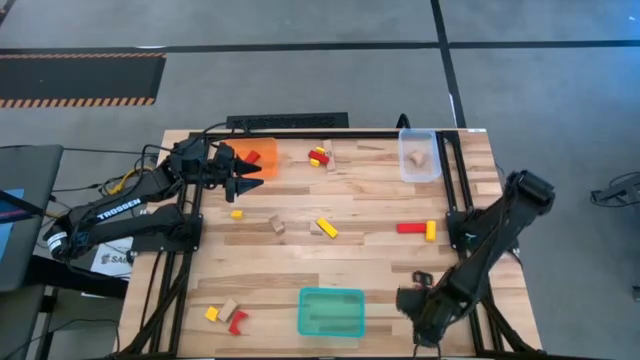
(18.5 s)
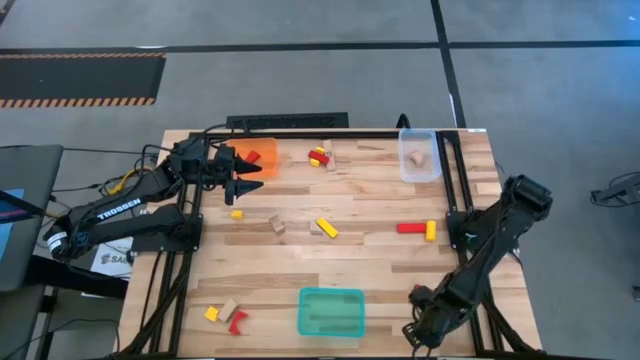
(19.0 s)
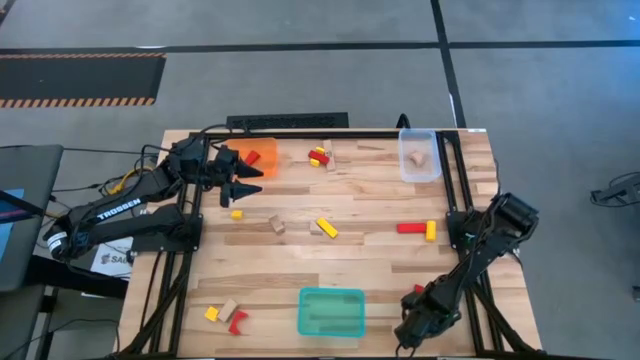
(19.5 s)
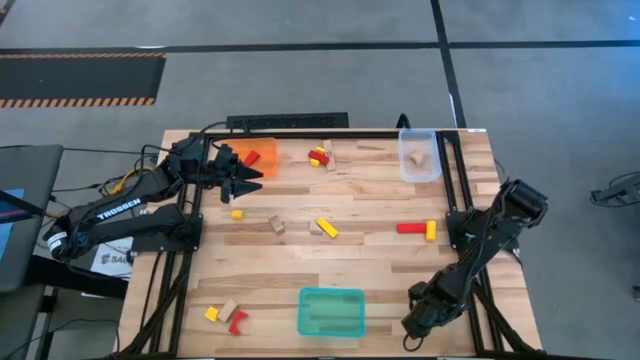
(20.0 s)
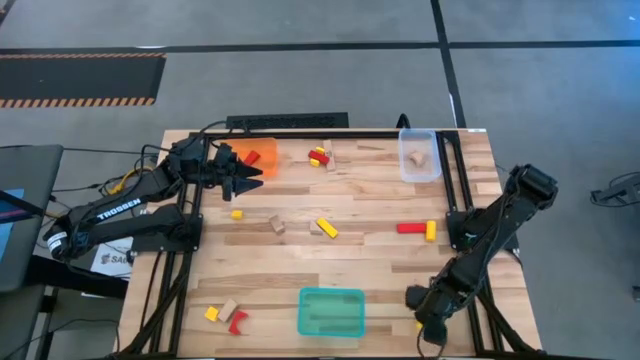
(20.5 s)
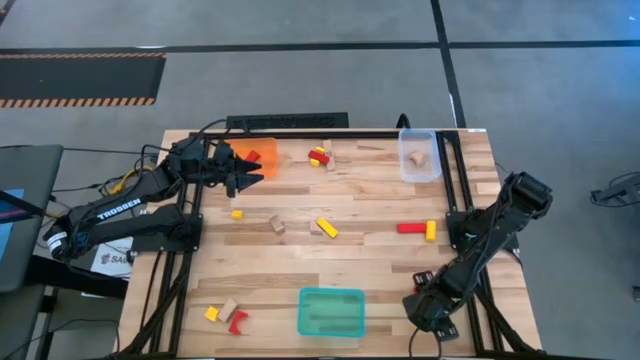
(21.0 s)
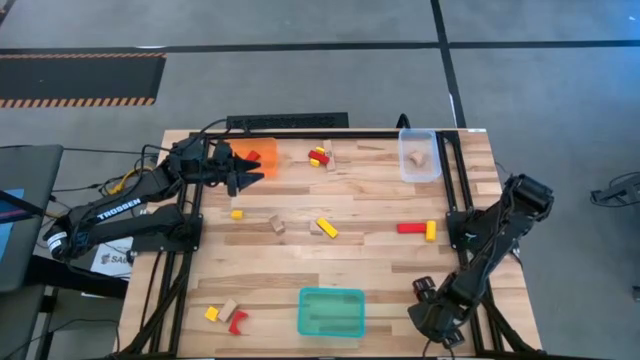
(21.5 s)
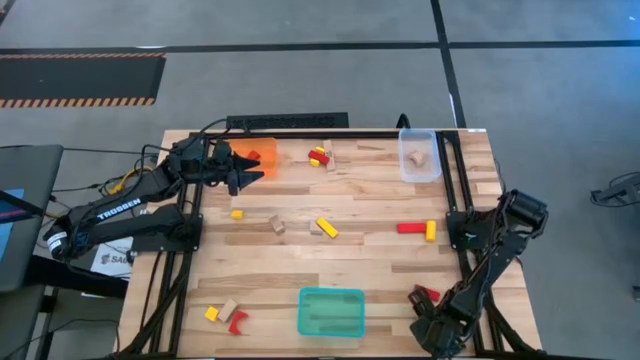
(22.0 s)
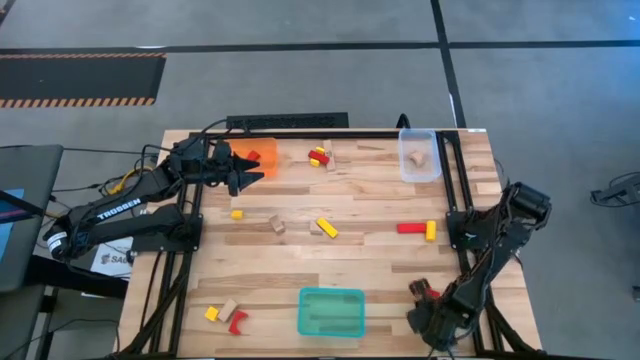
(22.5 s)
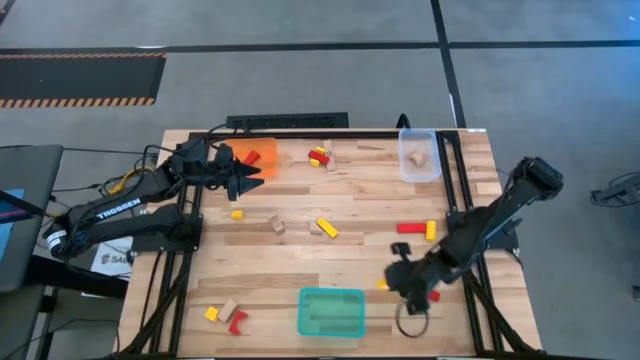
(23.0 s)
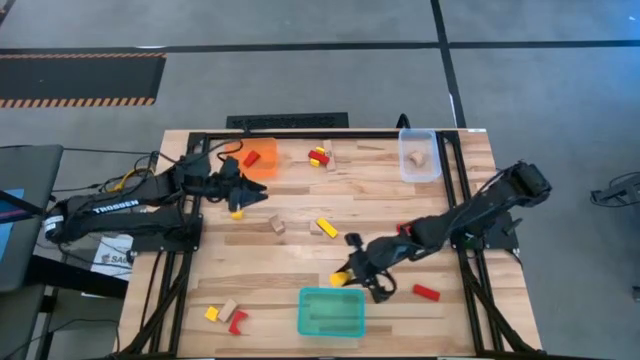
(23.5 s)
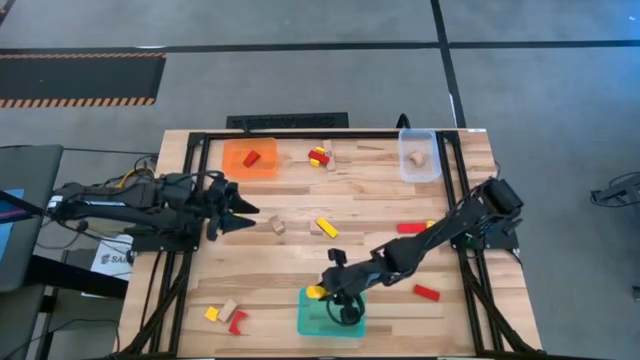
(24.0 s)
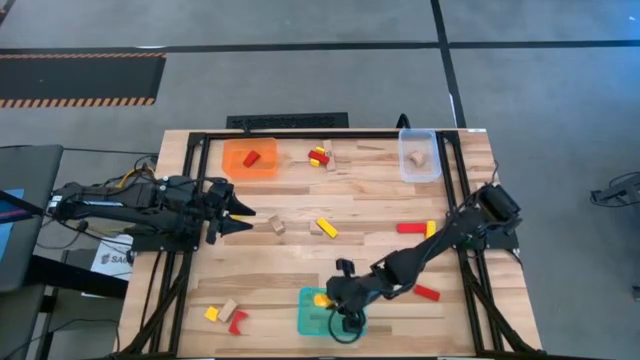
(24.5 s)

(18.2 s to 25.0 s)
Task: Sort & place blocks by color
Put the yellow block into the blue bin

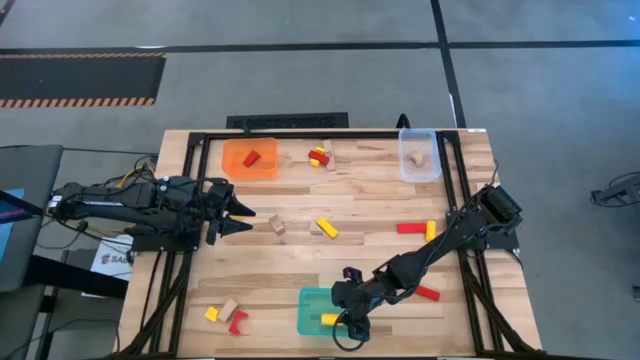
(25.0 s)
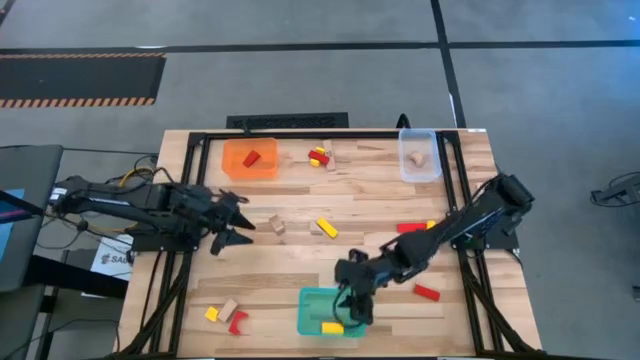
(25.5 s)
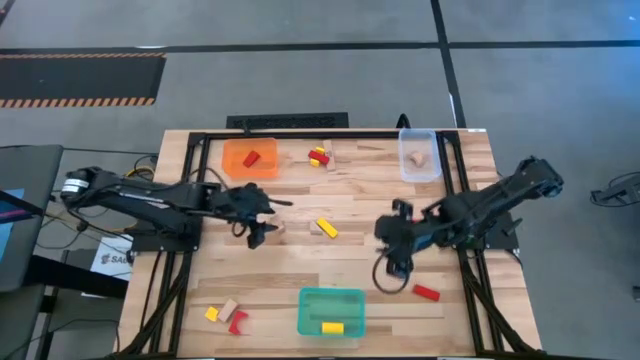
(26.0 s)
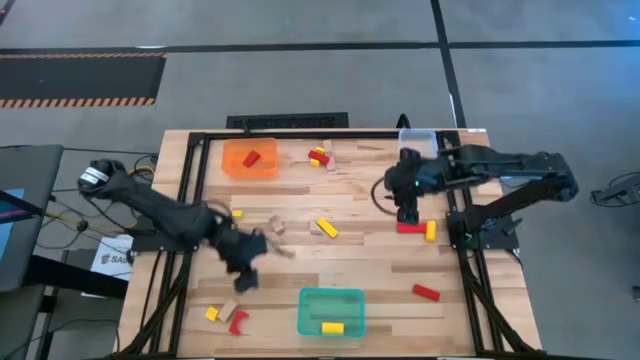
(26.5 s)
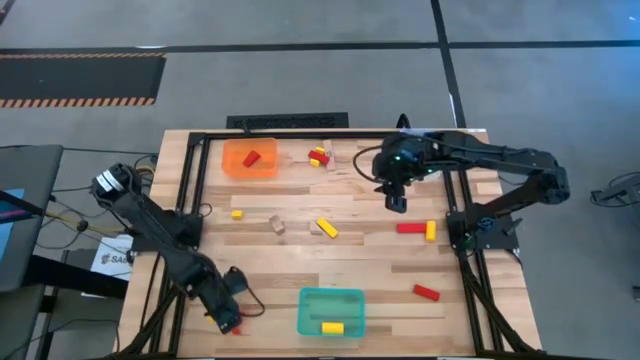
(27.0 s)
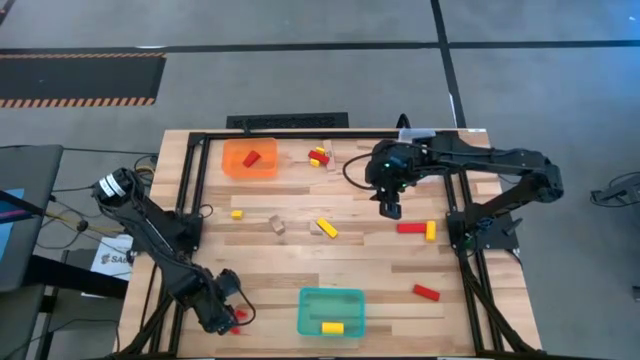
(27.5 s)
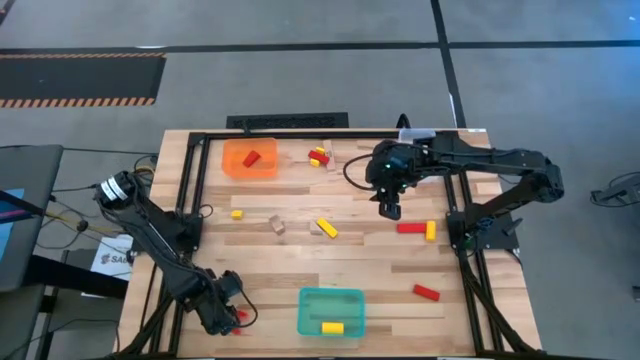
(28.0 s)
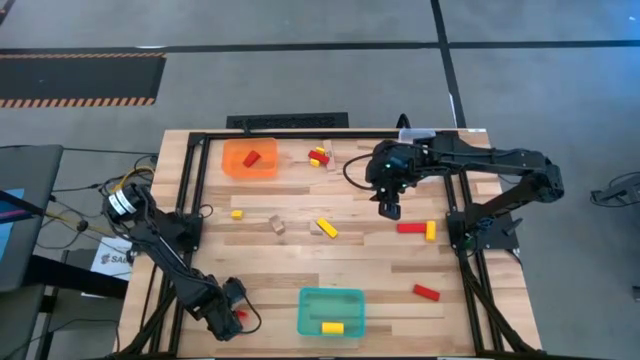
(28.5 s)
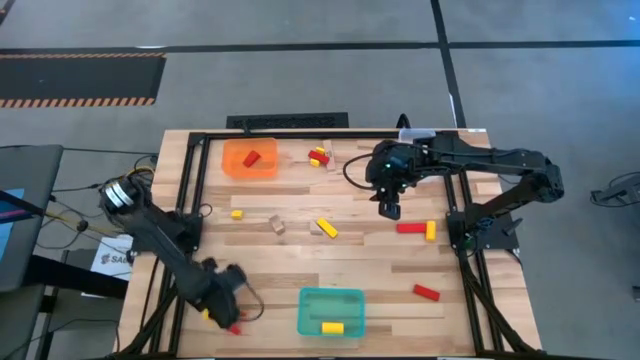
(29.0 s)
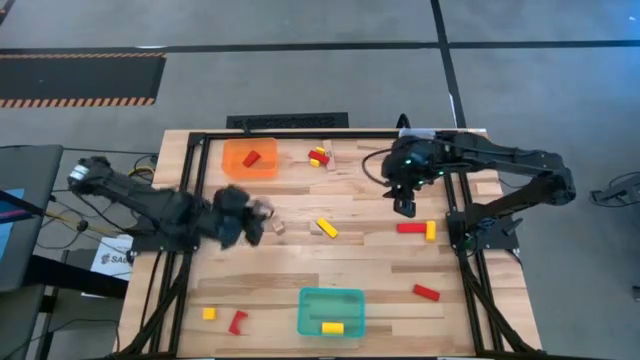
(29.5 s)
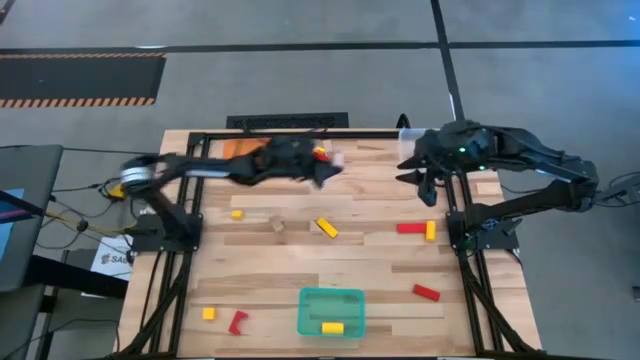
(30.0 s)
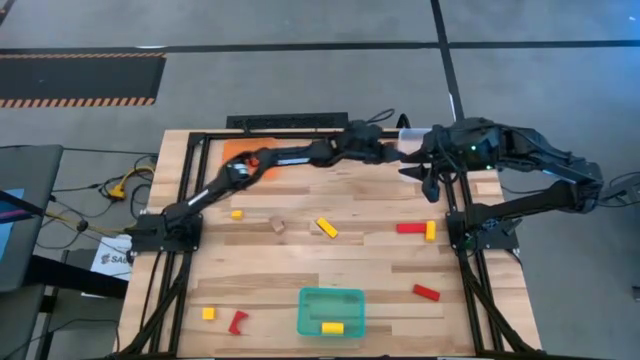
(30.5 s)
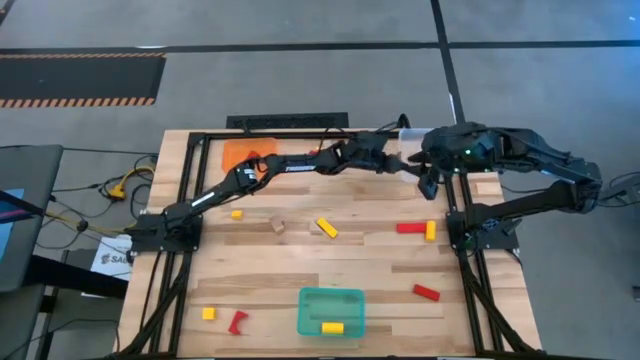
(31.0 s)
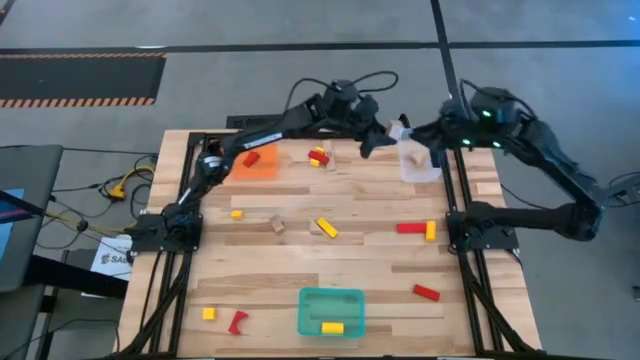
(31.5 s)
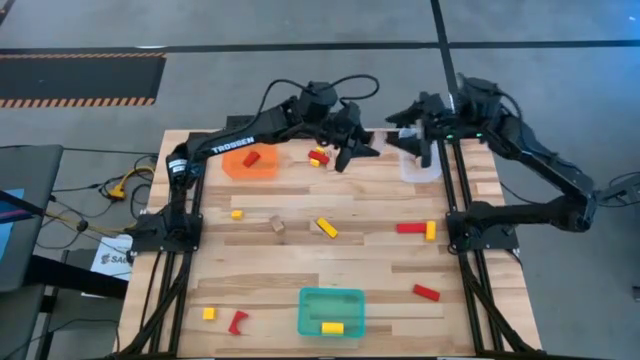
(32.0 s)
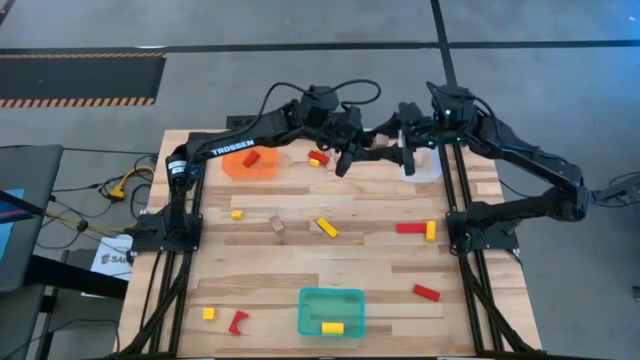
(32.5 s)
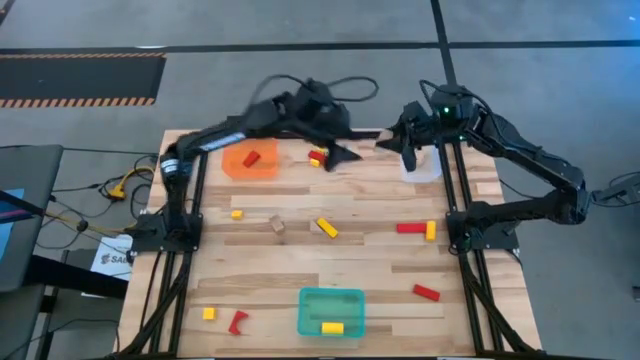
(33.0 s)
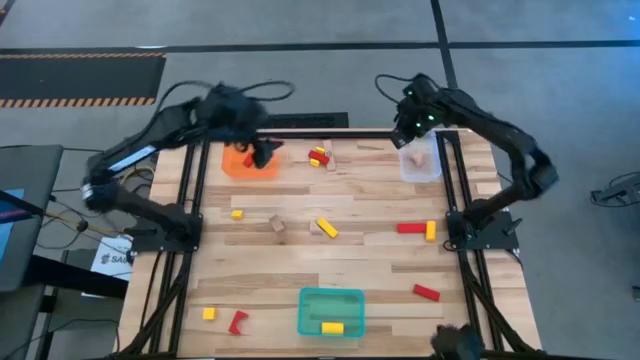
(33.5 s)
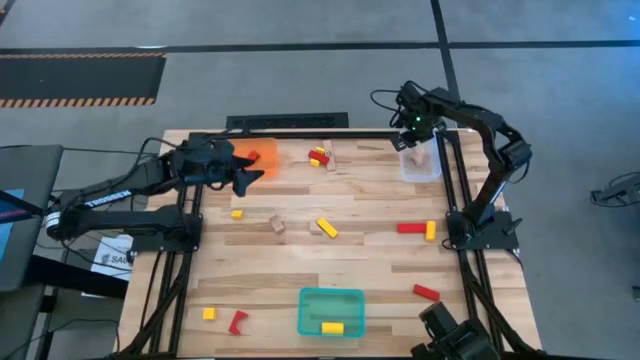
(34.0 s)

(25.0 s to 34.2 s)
Put the brown block into the brown bin

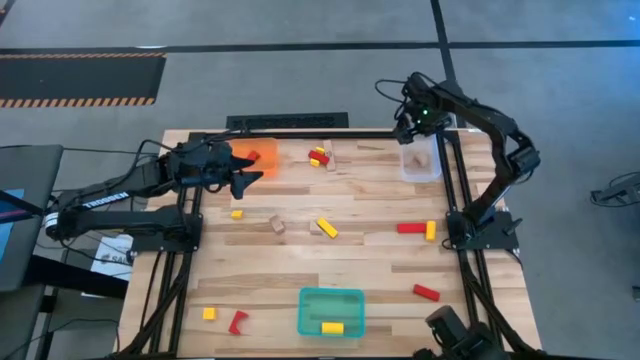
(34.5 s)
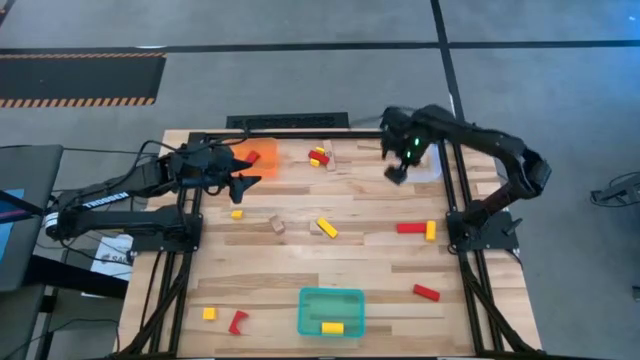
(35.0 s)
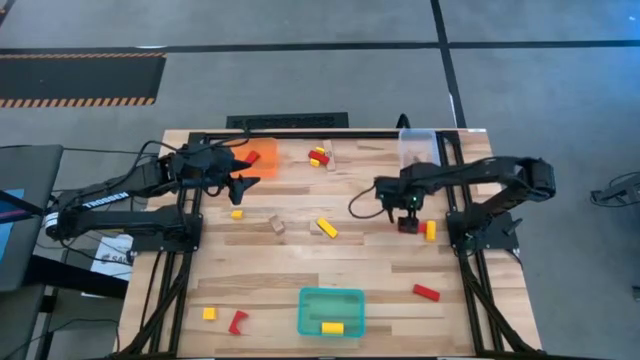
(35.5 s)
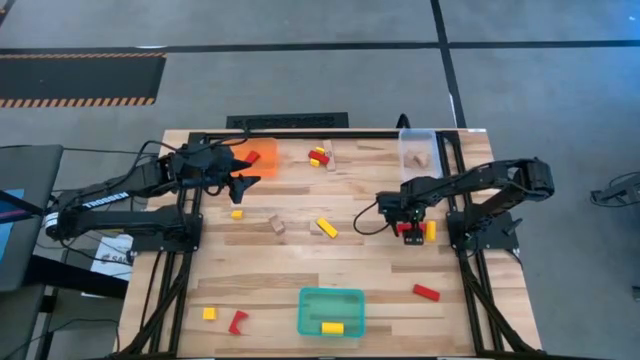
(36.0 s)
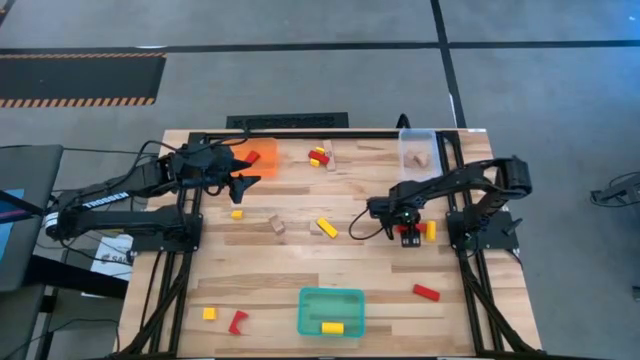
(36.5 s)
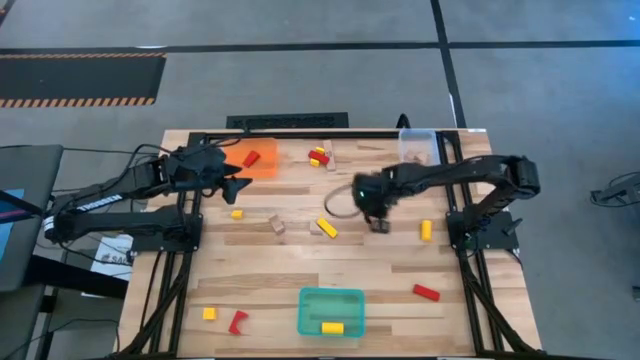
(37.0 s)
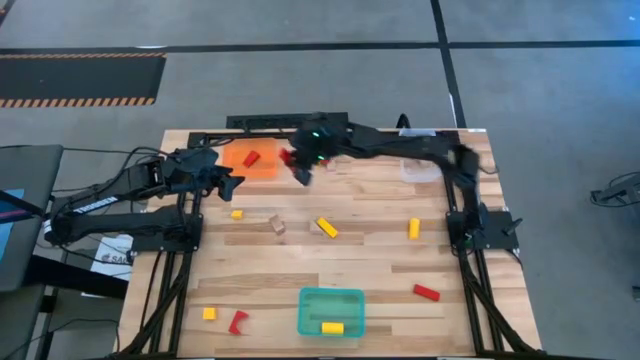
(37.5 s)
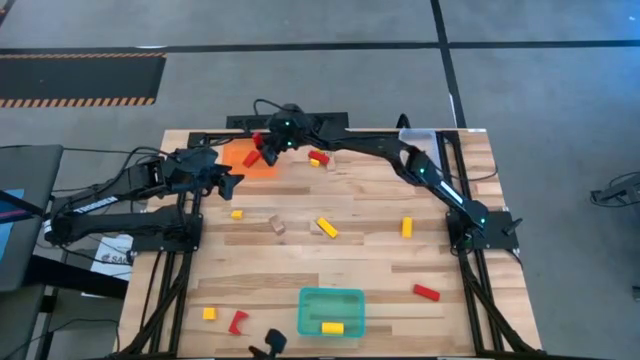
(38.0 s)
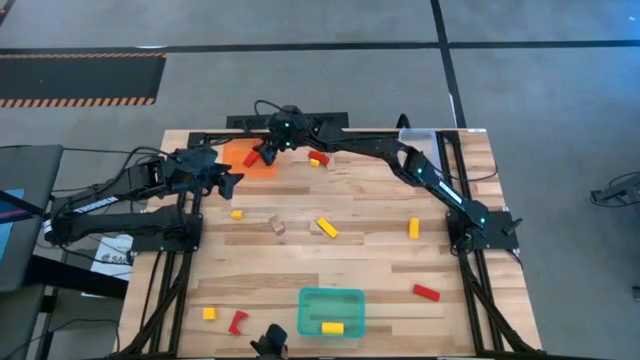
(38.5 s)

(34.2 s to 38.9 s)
Put the red block into the orange bin
